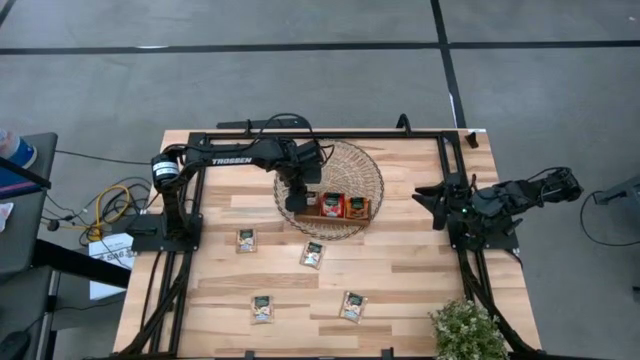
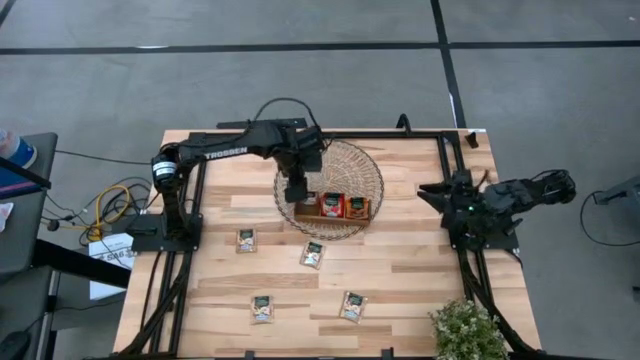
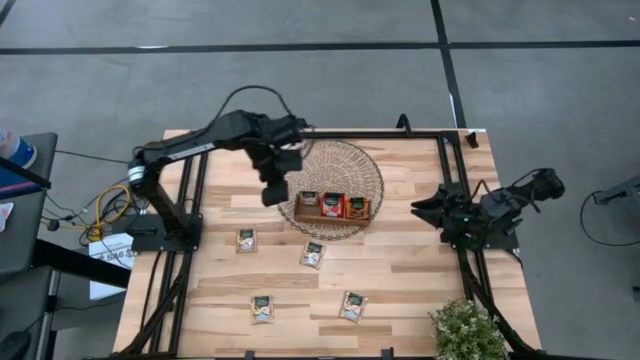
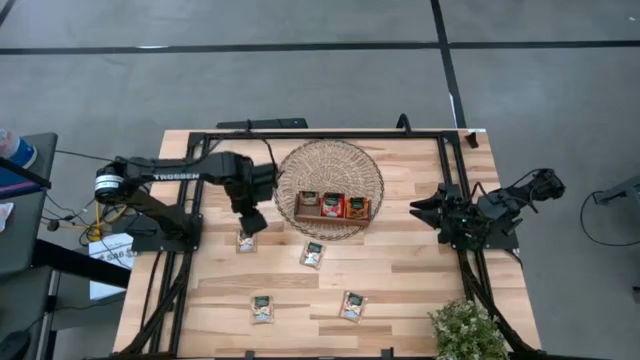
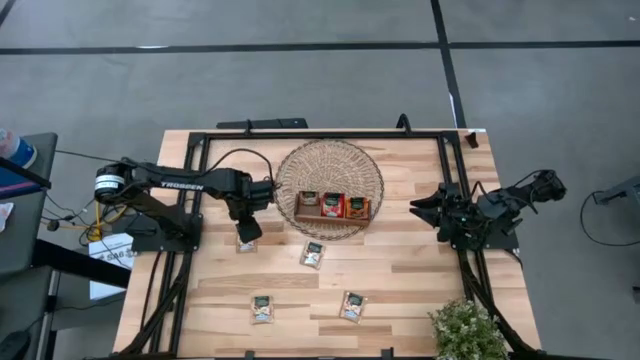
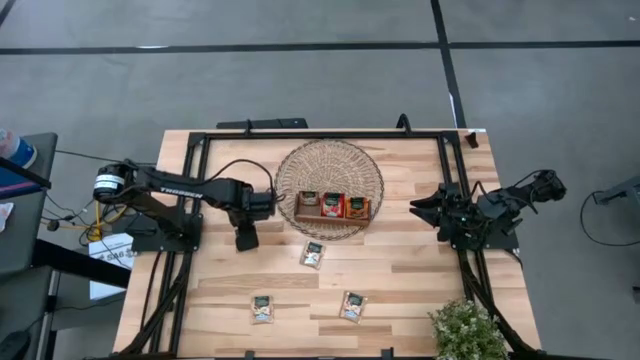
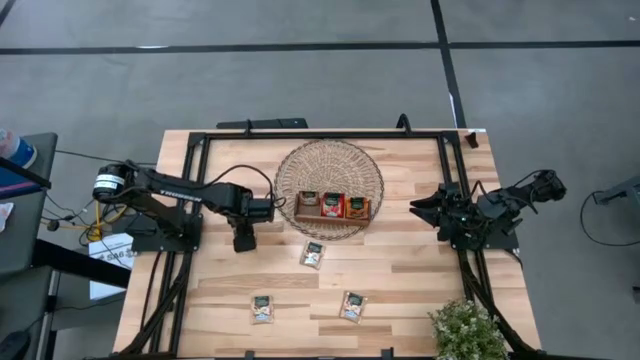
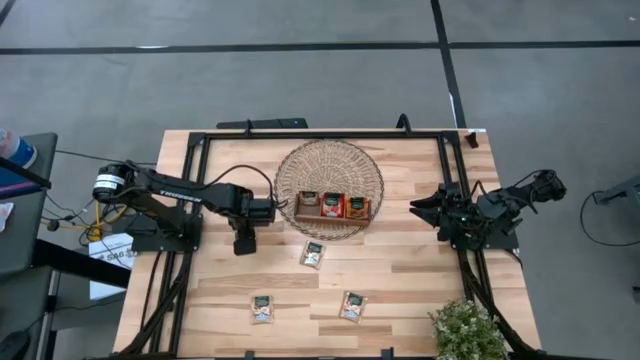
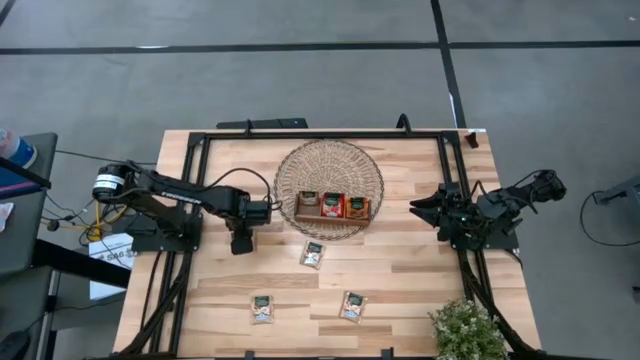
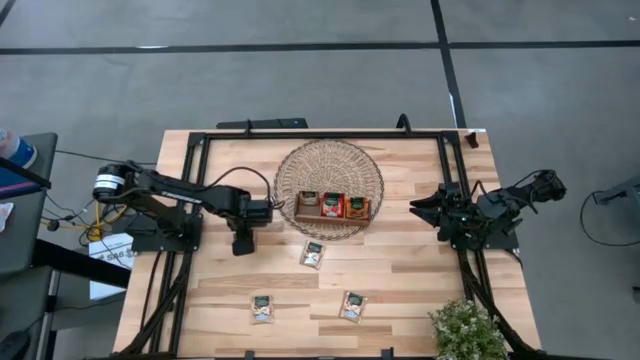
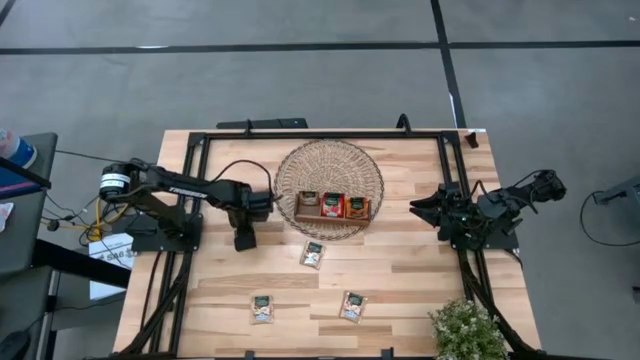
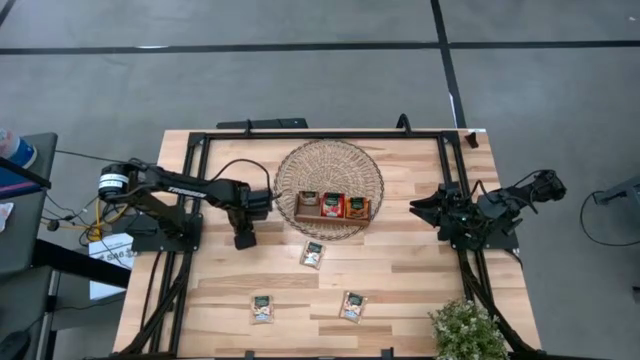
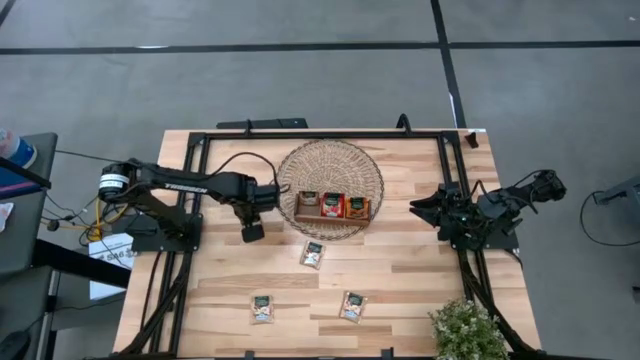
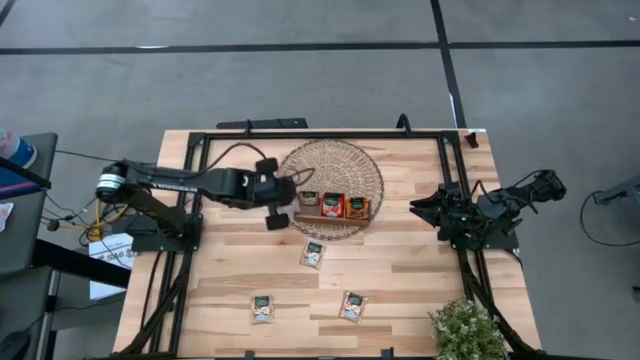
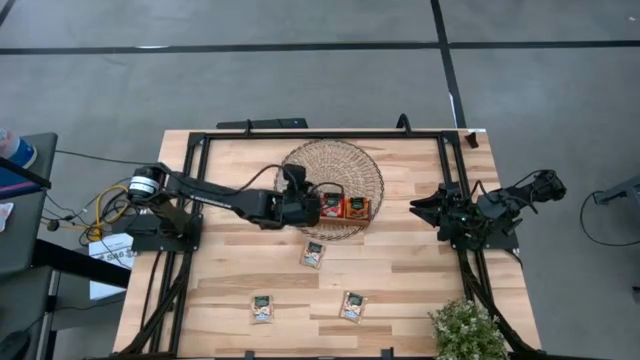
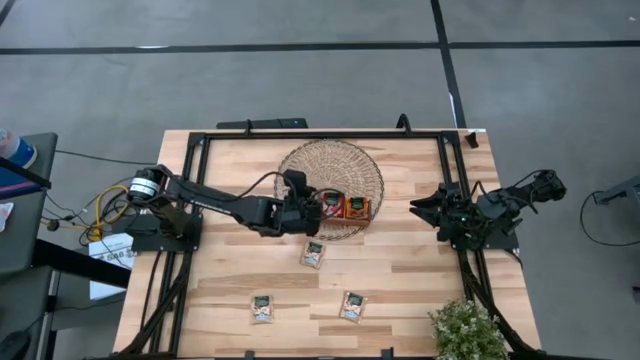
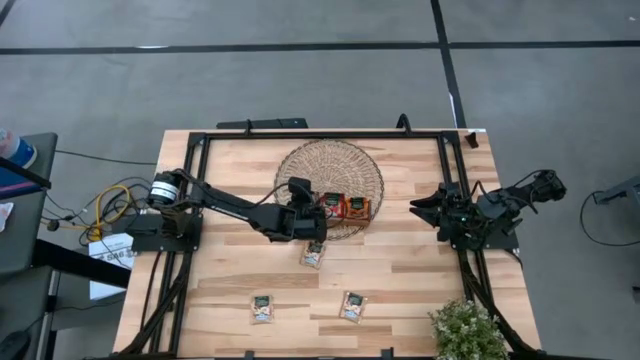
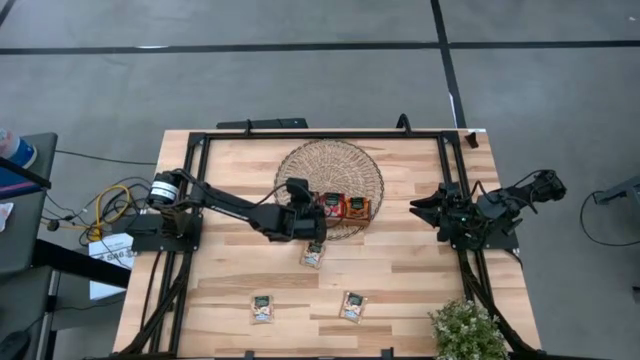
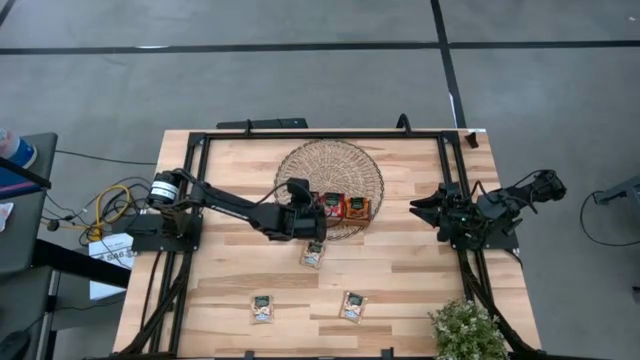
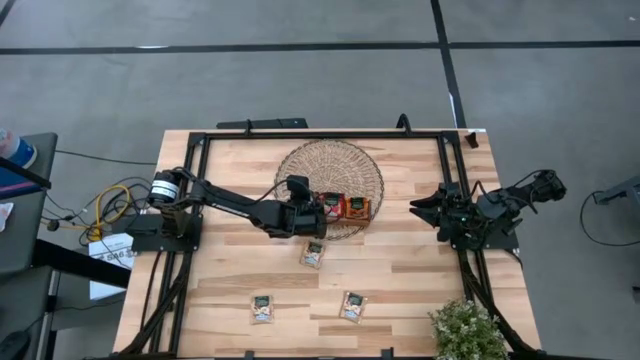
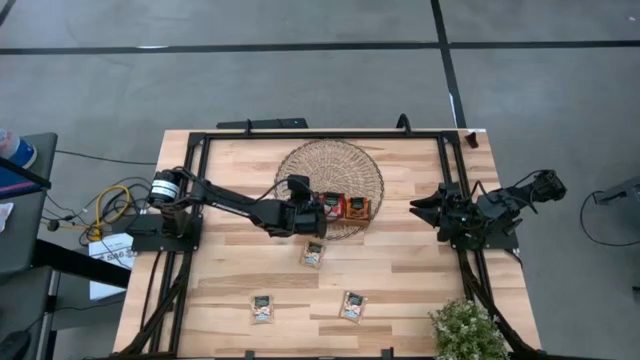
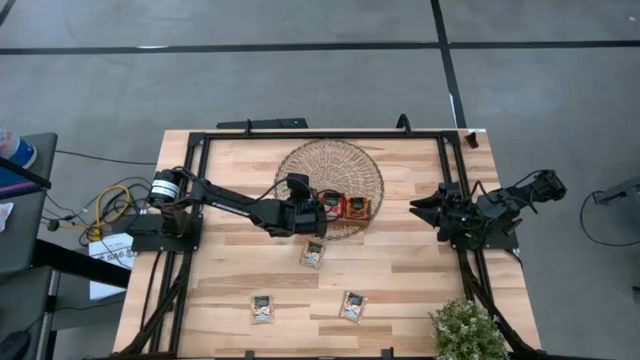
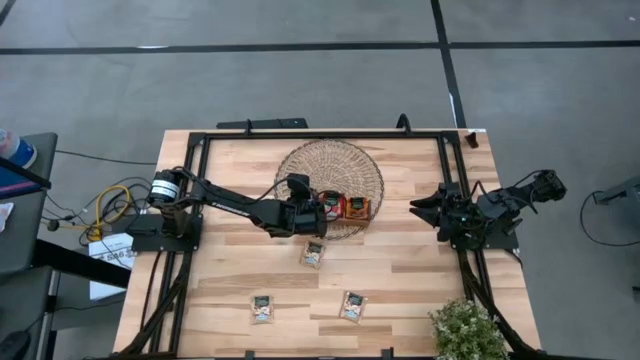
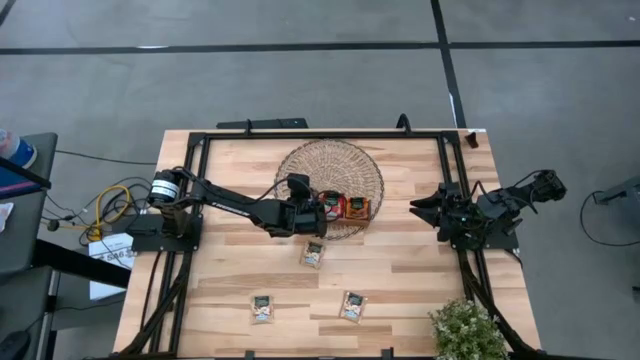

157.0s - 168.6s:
Task: Pick & Place Tea
Put the brown tea bag into the left section of the wooden organizer

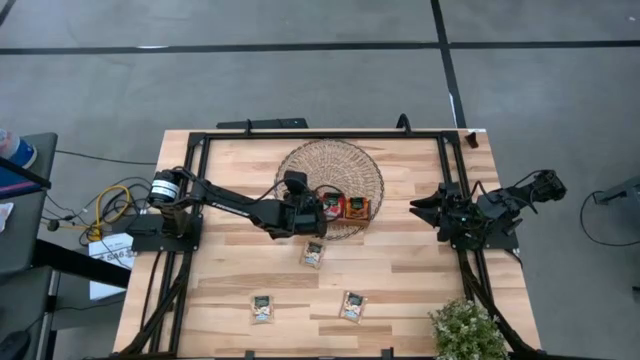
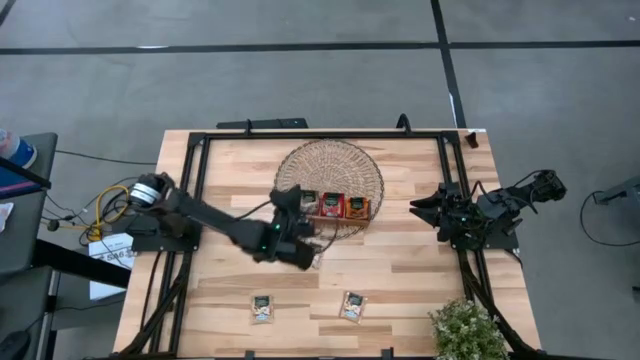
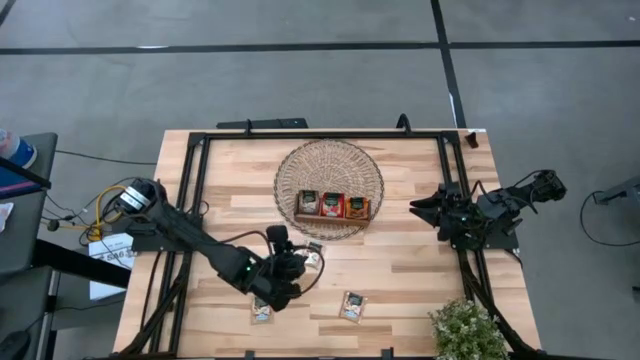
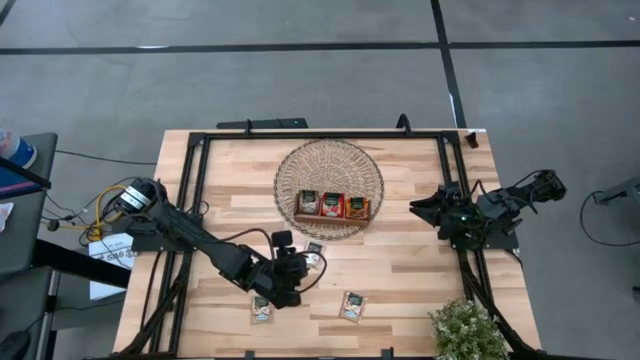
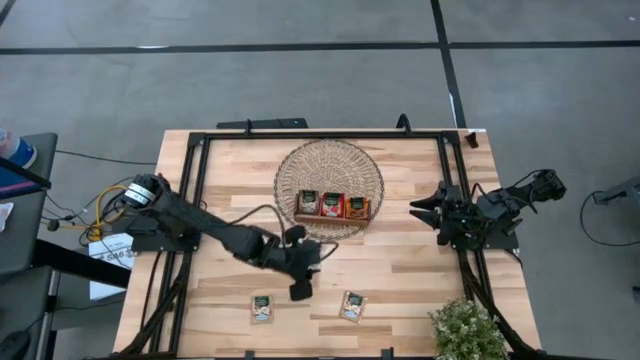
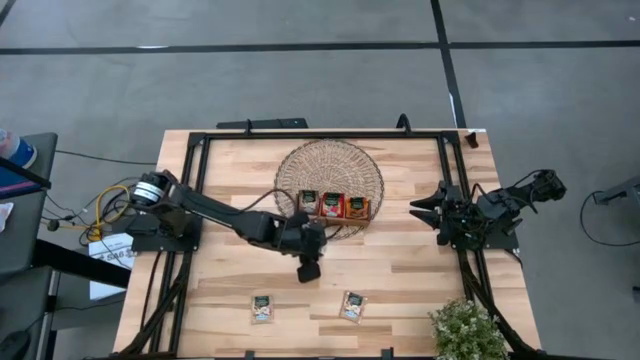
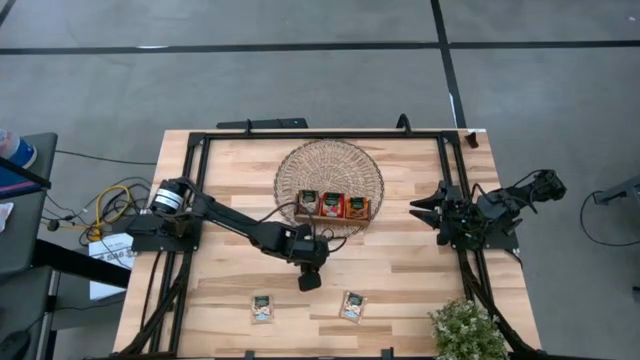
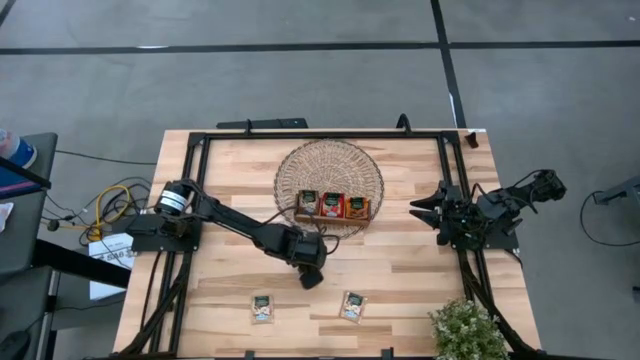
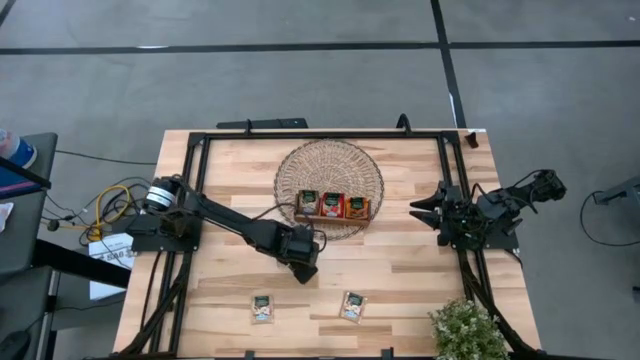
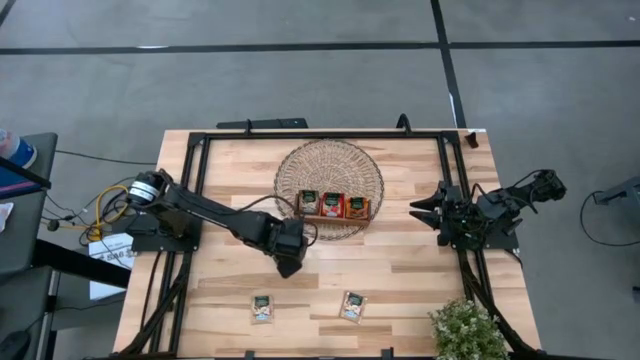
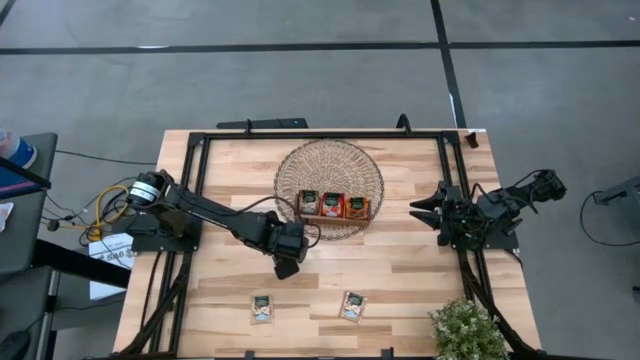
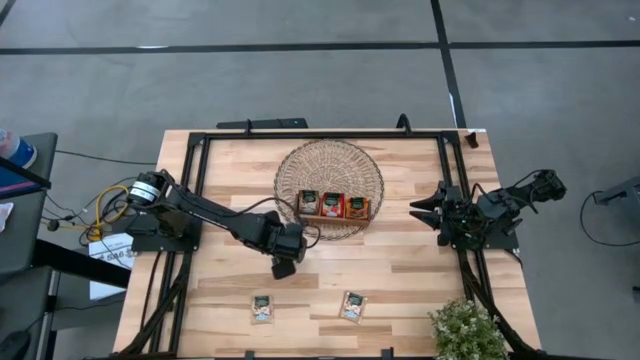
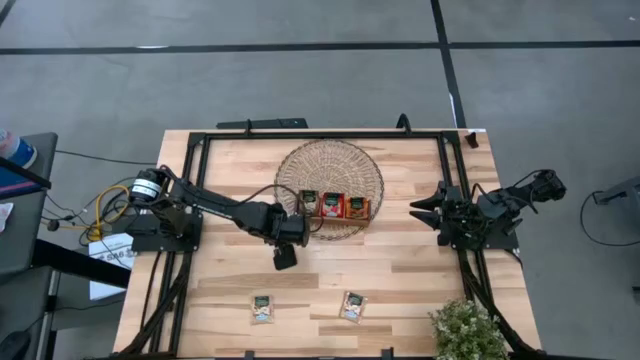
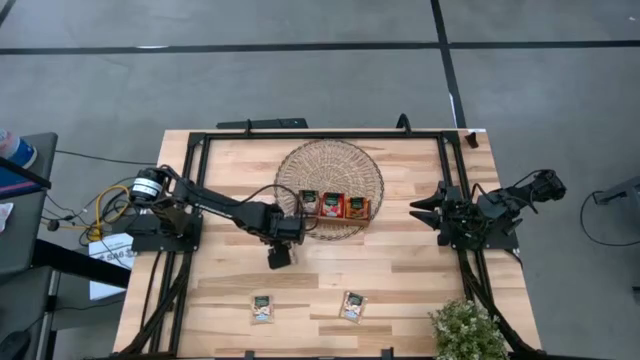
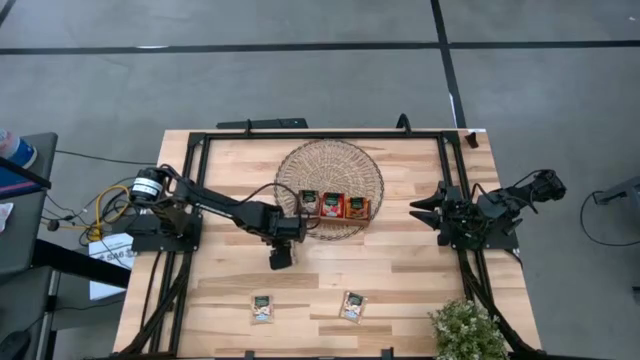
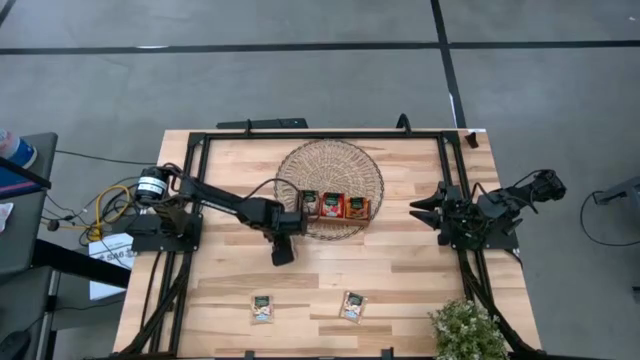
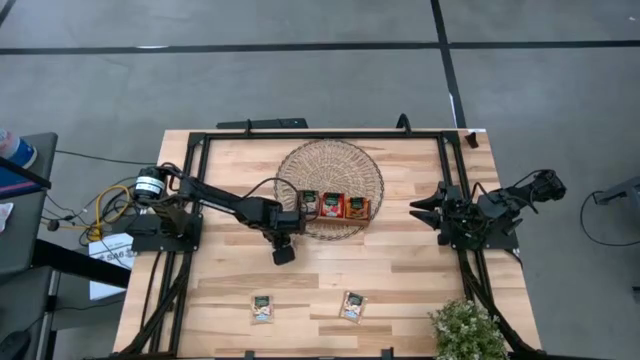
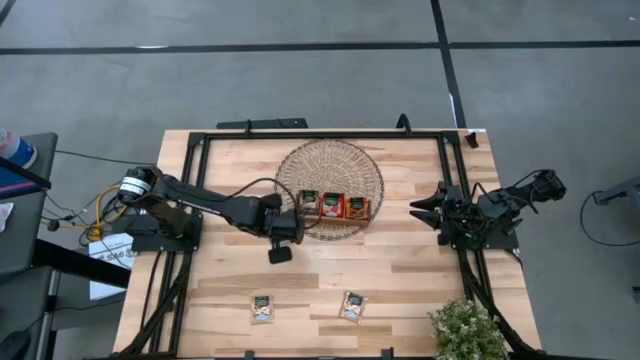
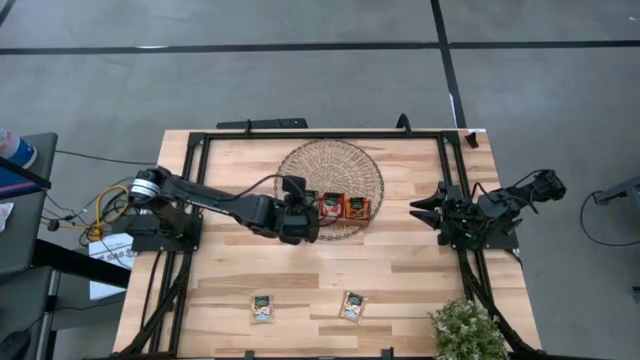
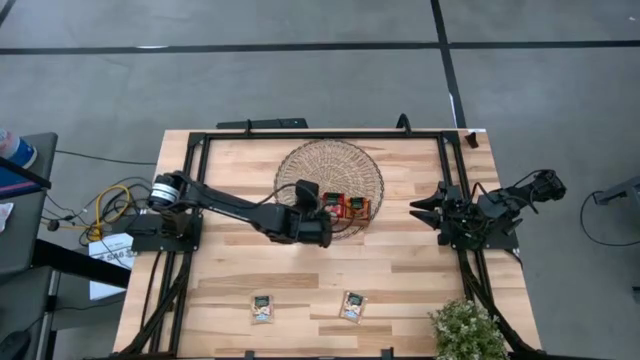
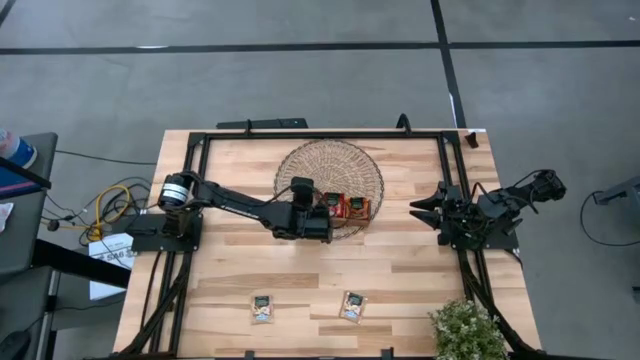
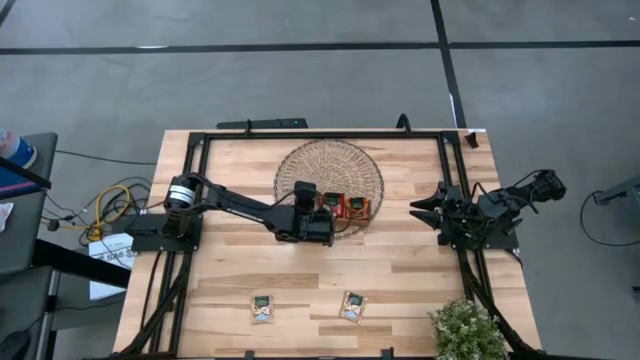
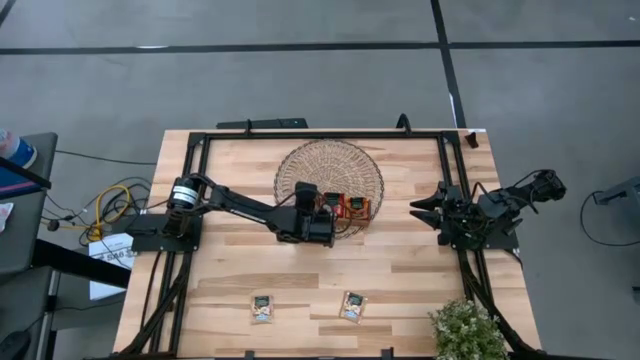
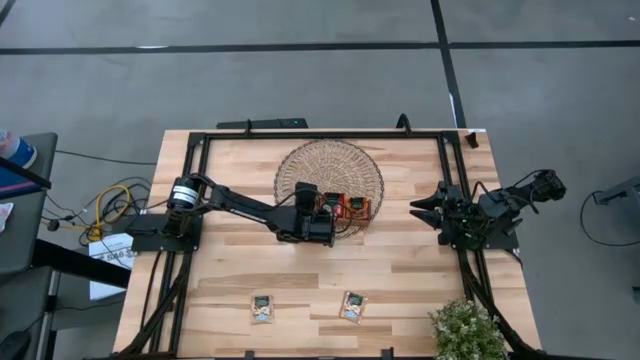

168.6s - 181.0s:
Put the brown tea bag into the left section of the wooden organizer
